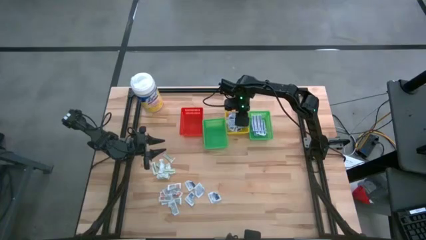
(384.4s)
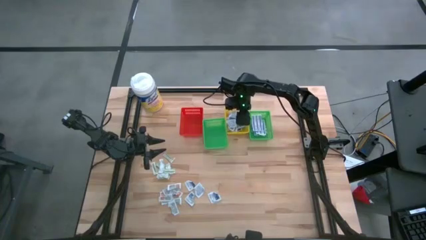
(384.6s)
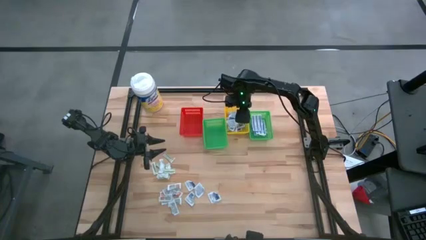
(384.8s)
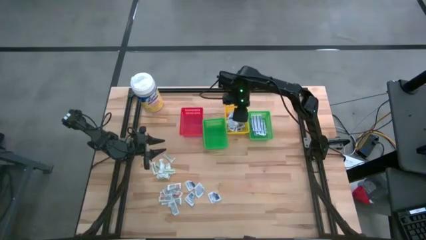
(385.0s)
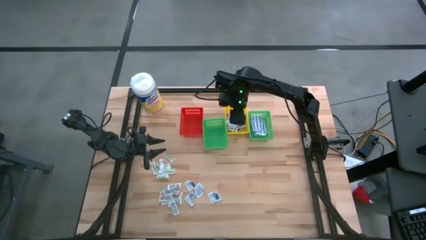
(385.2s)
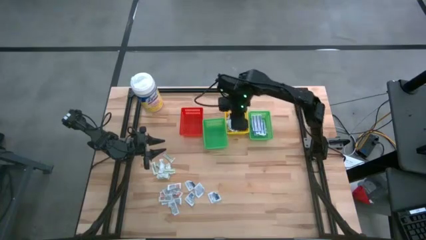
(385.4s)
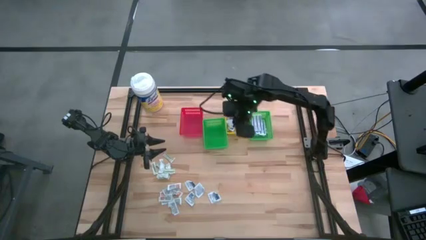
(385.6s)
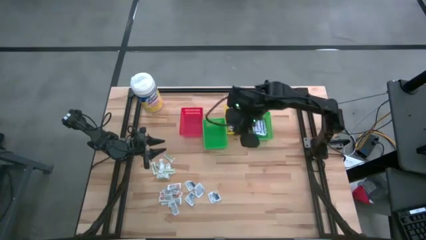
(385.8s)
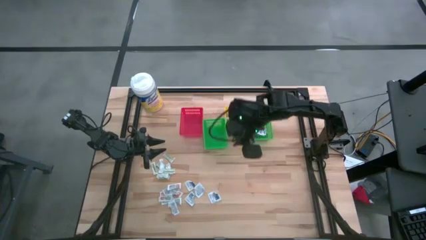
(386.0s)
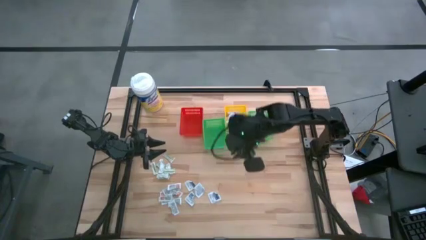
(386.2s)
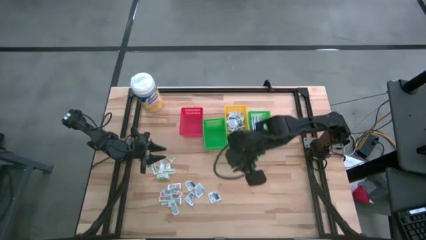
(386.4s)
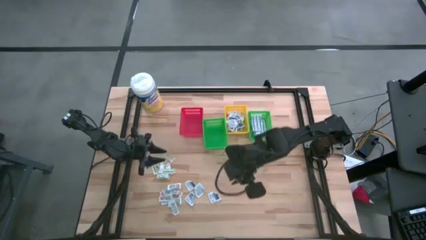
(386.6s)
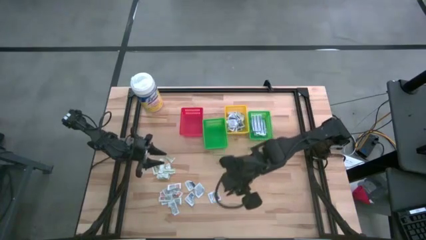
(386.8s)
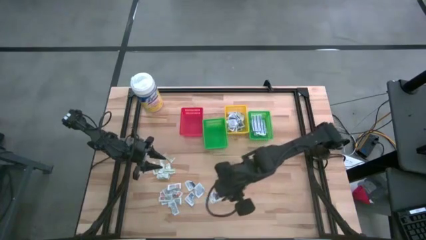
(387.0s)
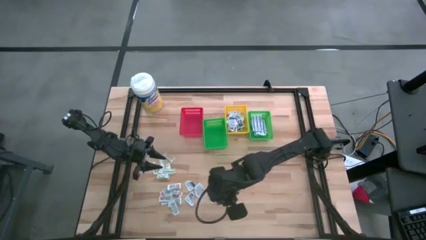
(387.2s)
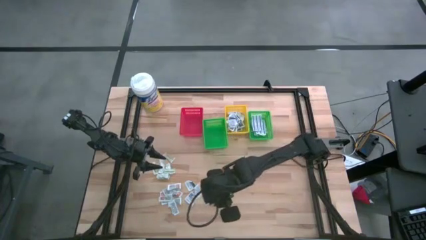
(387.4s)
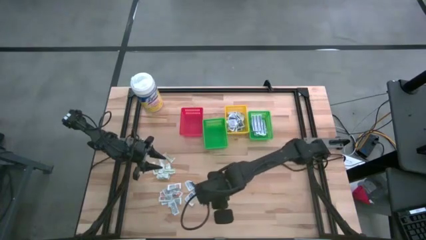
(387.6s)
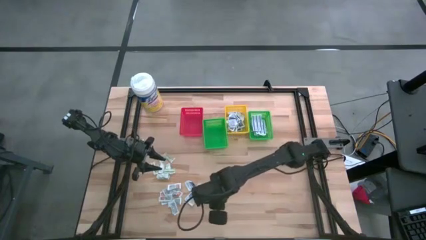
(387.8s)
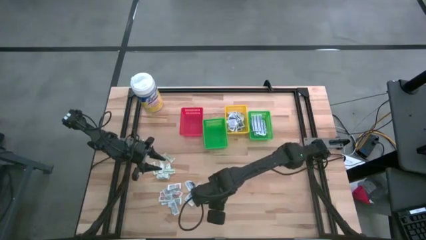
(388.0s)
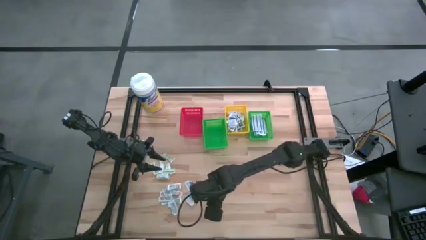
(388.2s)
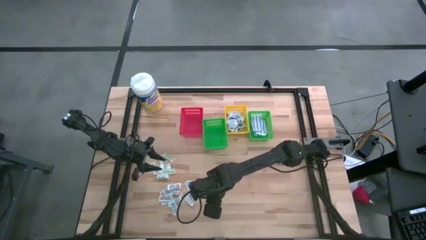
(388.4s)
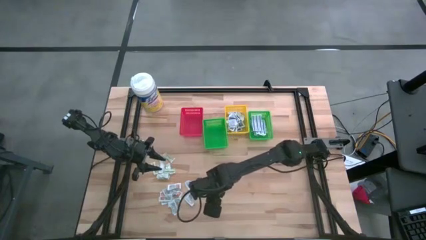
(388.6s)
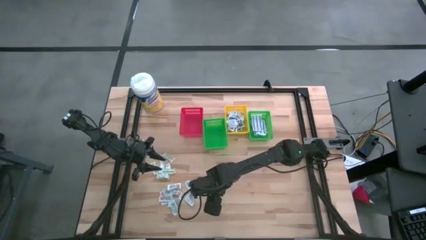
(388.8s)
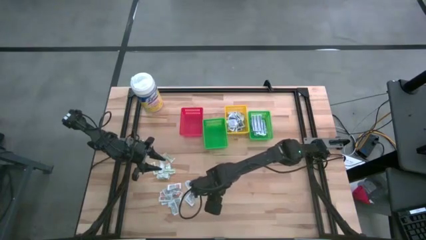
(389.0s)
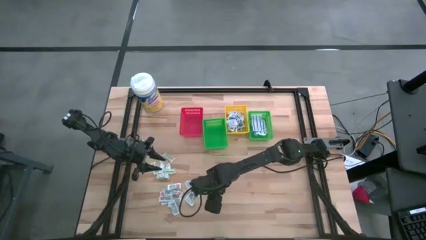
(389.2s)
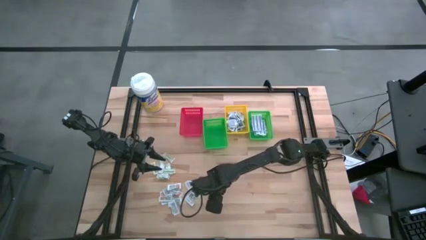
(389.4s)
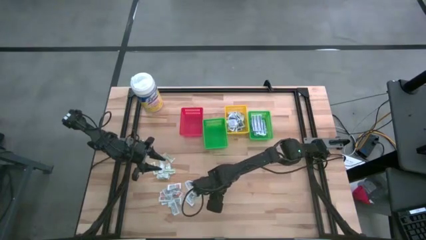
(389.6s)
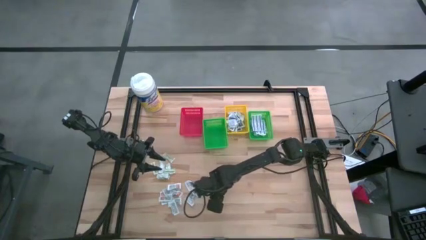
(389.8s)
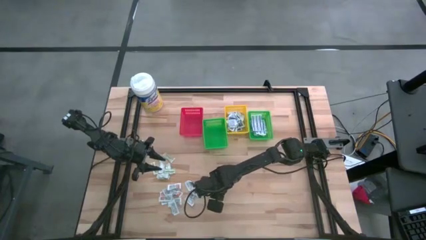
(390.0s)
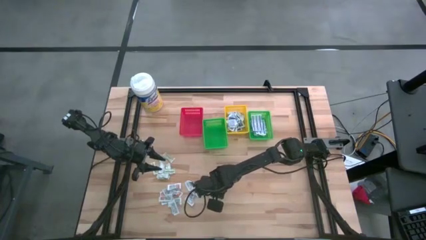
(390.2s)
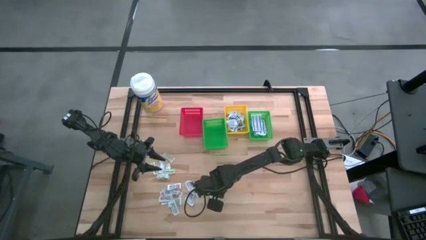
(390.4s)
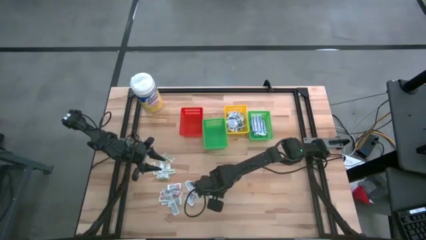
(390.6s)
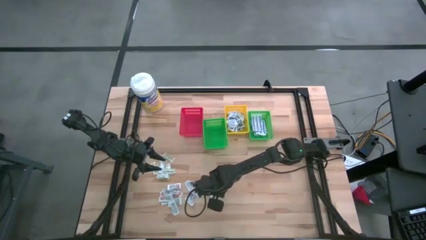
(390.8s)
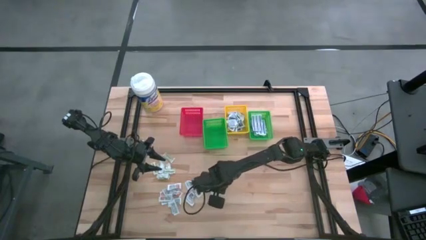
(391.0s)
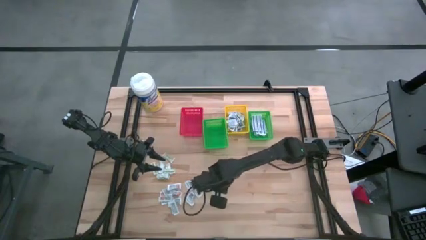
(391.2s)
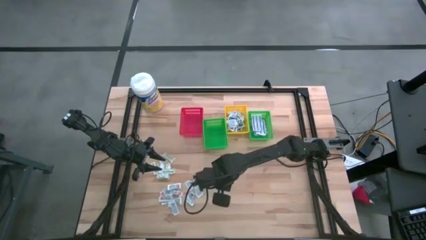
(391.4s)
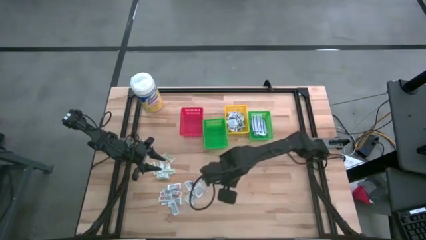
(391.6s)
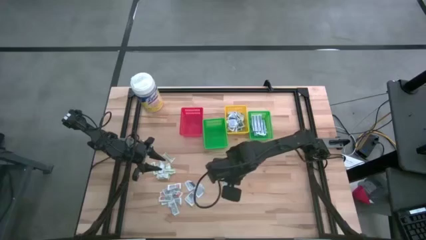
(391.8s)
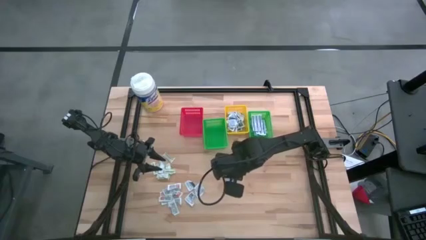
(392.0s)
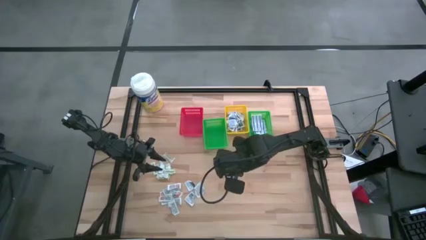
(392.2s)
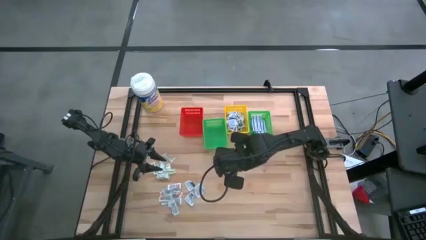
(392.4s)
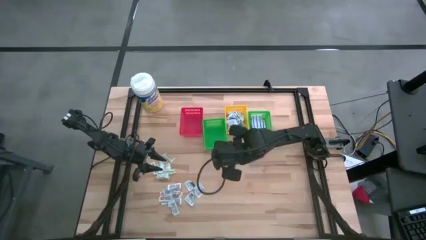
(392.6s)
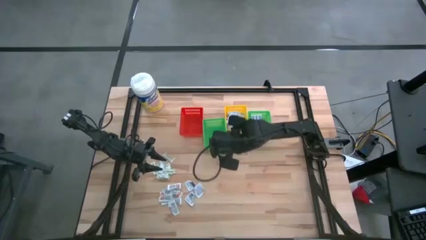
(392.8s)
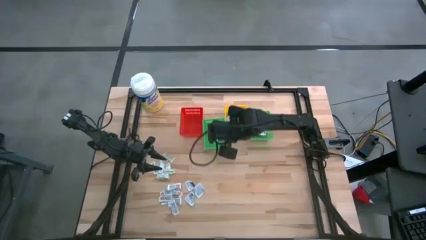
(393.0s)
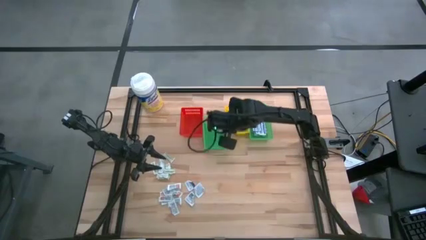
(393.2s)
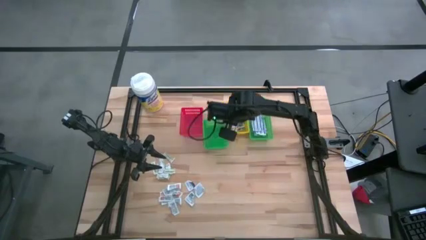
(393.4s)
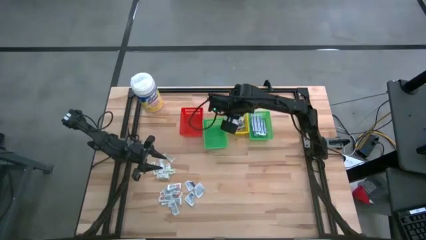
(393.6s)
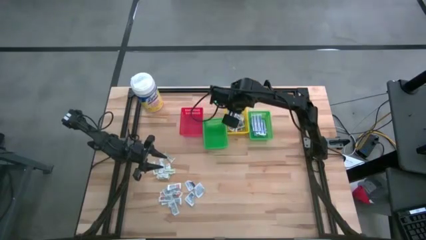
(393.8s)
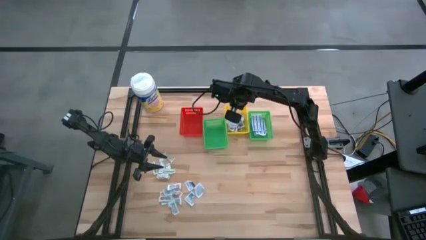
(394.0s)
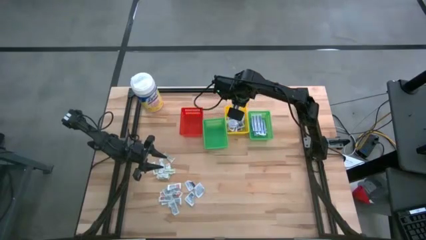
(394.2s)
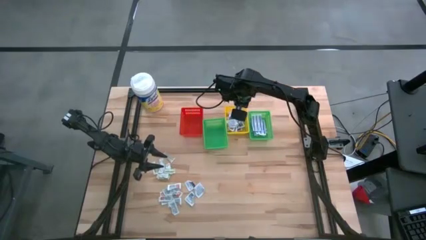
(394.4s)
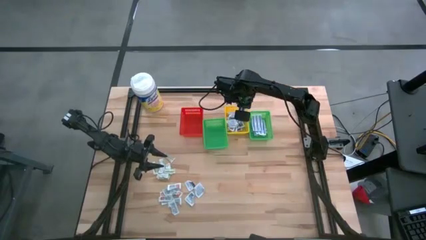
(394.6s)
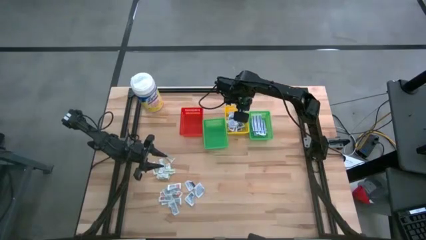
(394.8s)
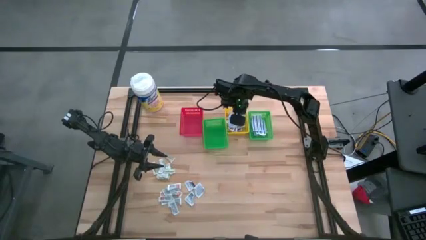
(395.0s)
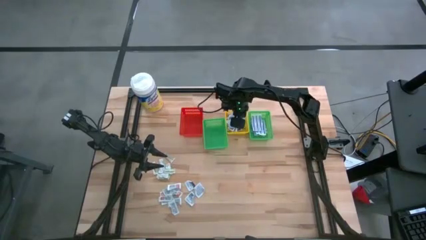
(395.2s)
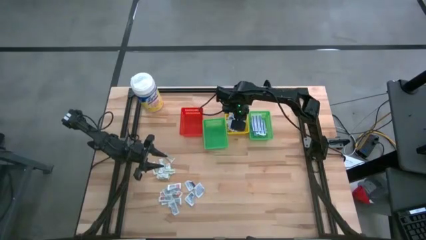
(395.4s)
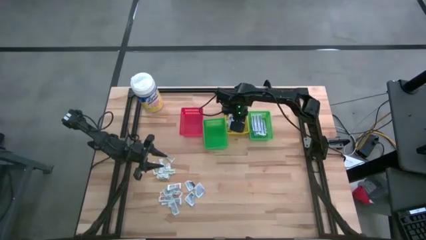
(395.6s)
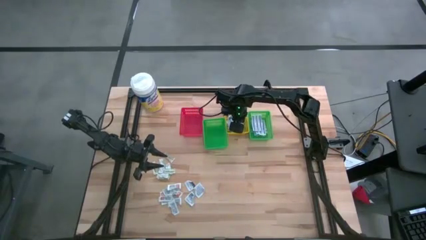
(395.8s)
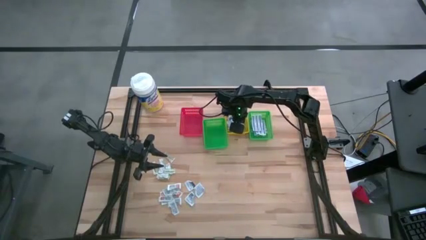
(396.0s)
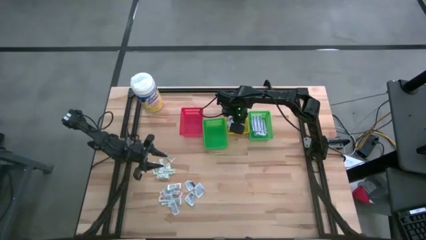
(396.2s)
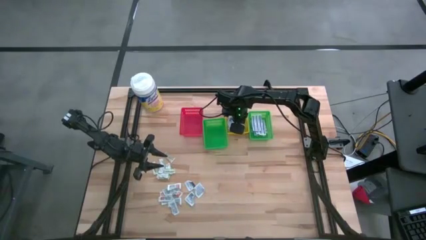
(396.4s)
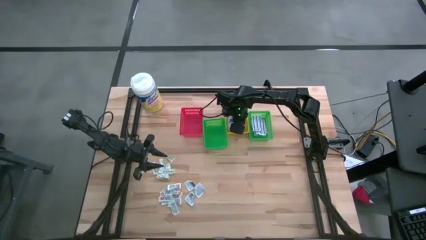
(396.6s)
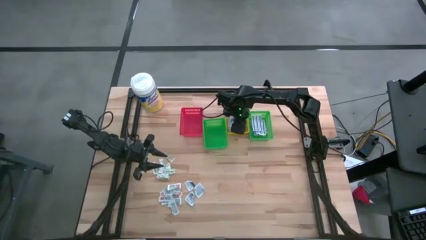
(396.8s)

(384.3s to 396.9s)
Task: Pick & Place First Aid Supplies
Put the alcohol pad into the yellow basket

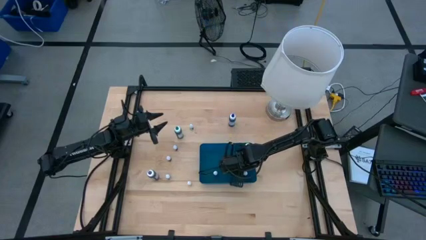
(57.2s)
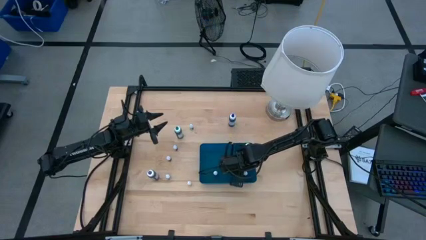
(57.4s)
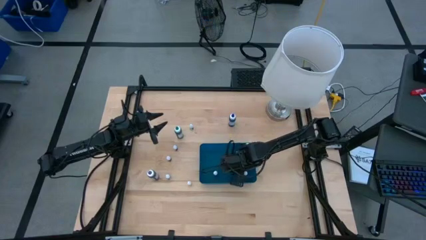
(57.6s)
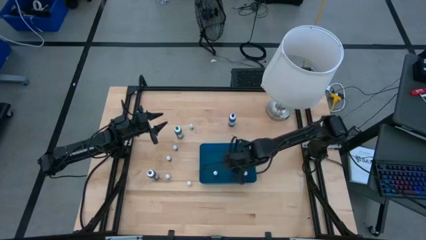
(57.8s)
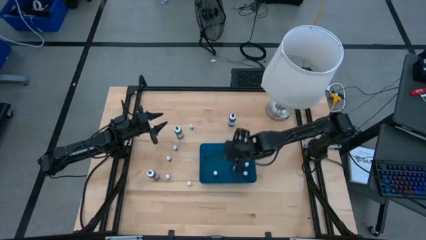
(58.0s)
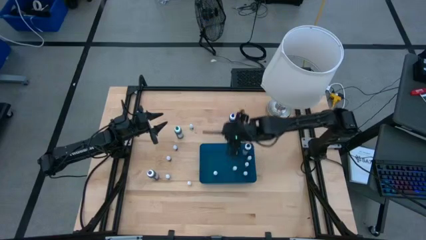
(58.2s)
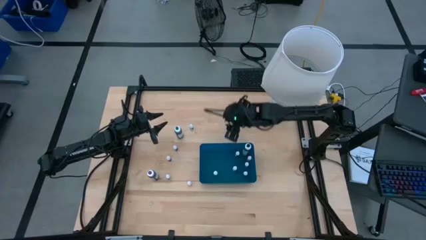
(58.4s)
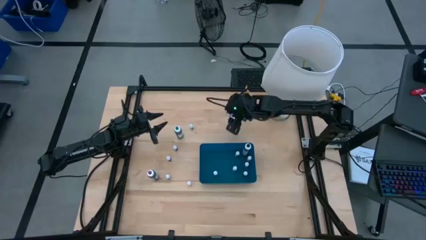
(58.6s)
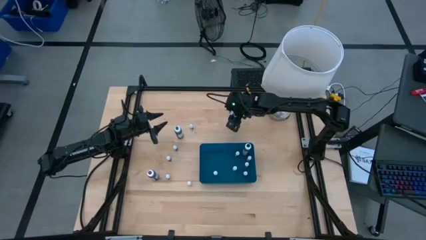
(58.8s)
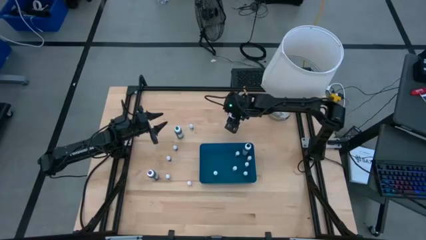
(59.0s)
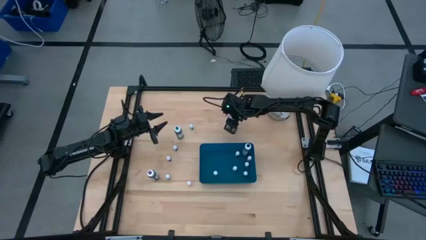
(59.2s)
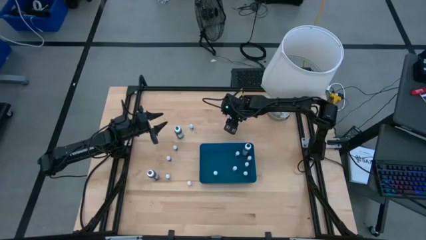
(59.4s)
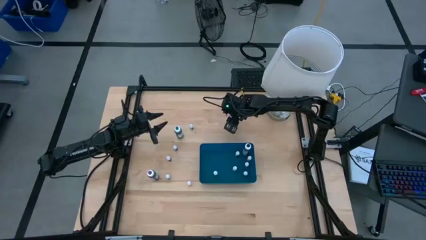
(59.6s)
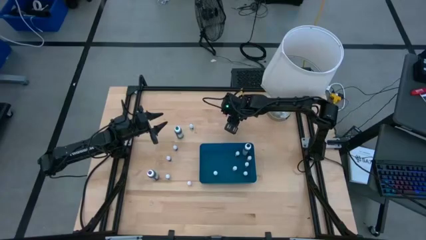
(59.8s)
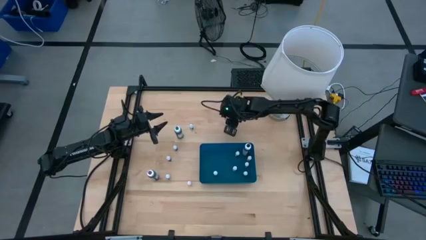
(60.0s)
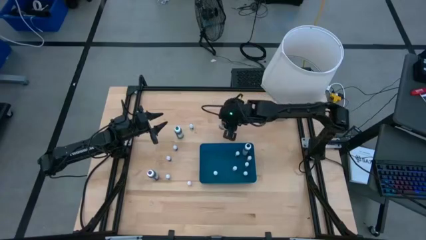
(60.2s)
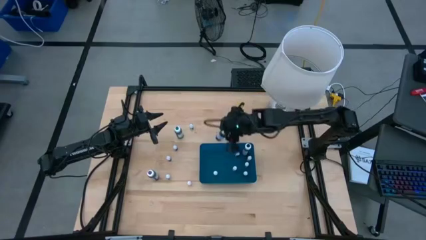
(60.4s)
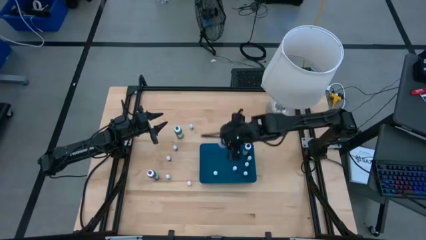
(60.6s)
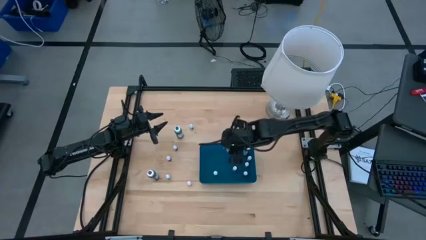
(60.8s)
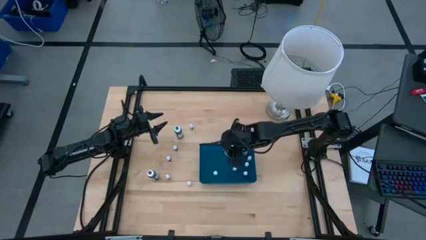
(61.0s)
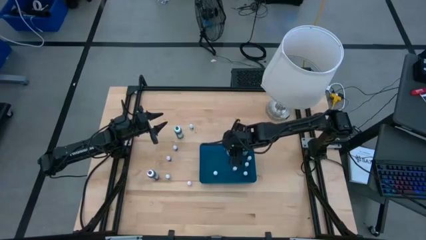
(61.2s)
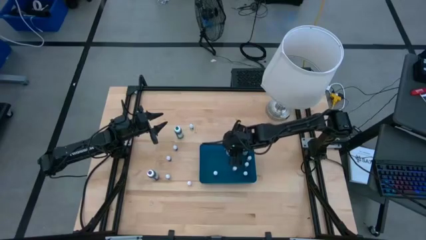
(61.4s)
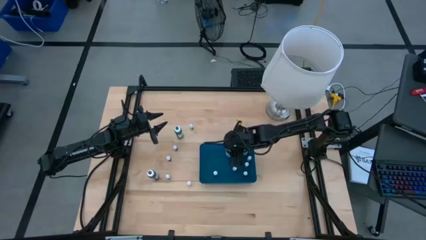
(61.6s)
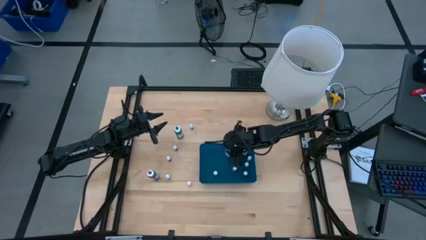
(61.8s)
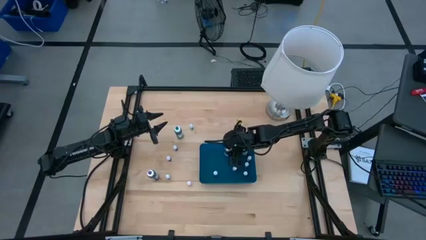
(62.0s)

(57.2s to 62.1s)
Task: Pick & Place food coloring
Put the big blue food coloring bottle into the blue bin
